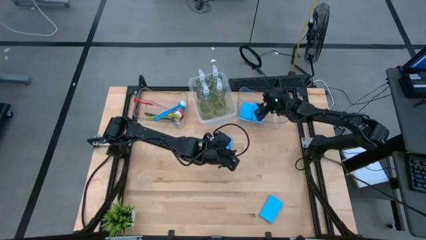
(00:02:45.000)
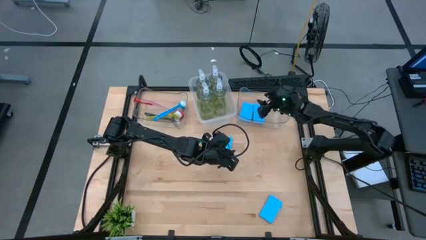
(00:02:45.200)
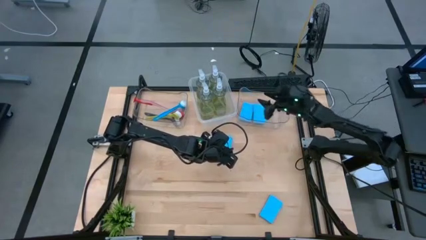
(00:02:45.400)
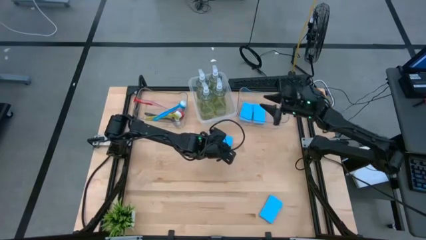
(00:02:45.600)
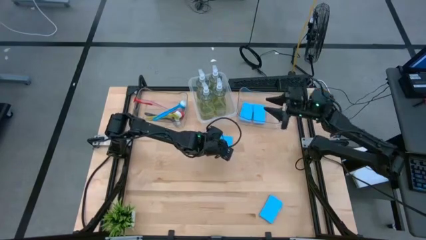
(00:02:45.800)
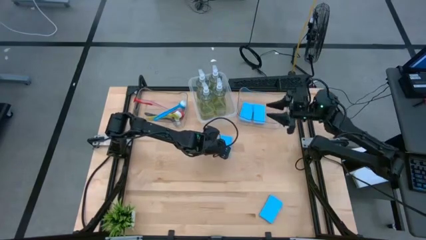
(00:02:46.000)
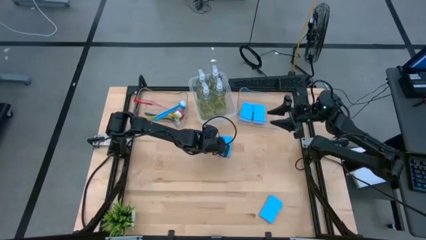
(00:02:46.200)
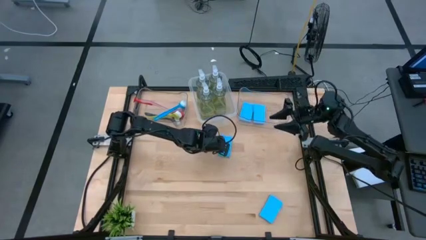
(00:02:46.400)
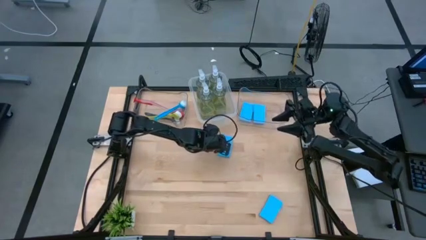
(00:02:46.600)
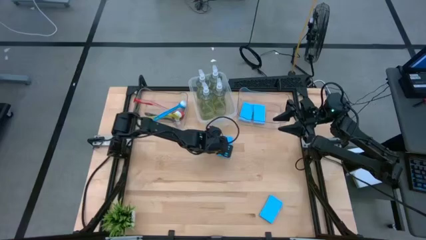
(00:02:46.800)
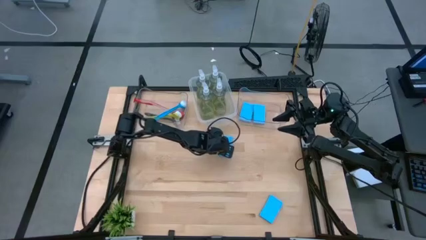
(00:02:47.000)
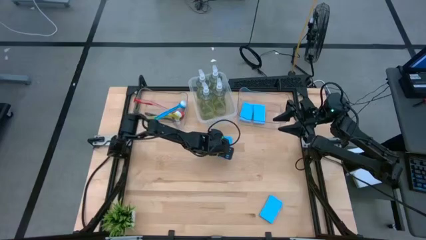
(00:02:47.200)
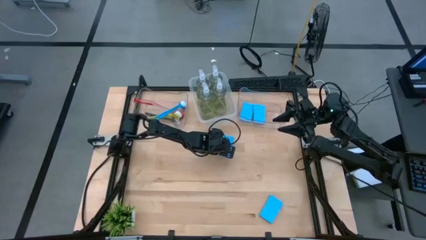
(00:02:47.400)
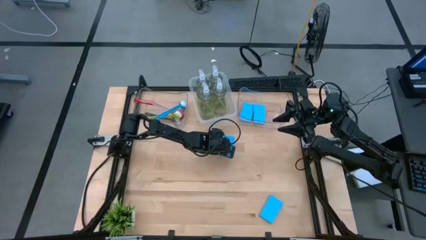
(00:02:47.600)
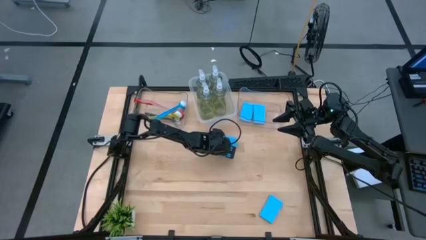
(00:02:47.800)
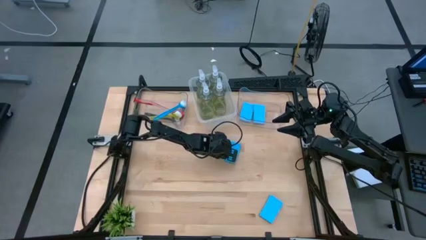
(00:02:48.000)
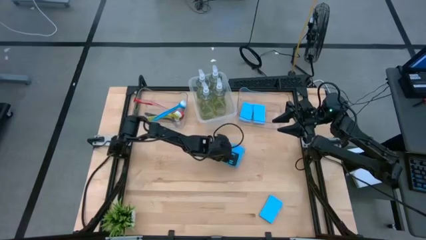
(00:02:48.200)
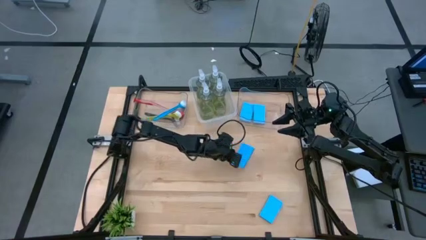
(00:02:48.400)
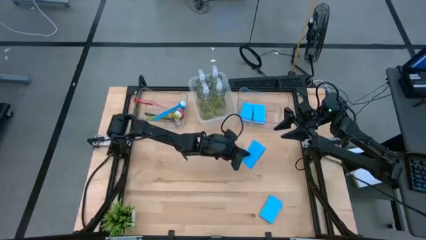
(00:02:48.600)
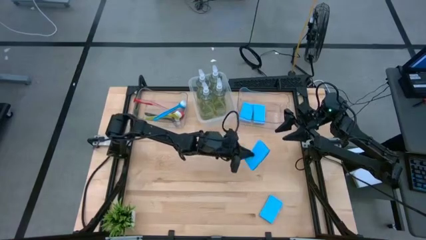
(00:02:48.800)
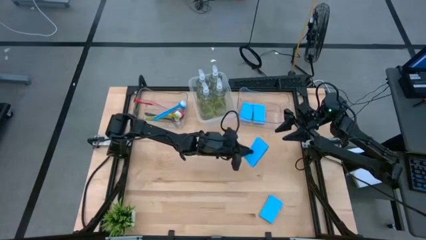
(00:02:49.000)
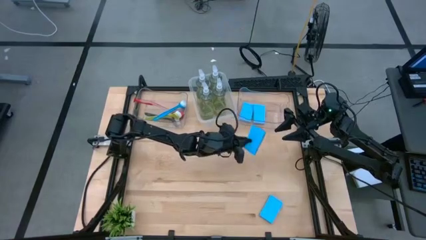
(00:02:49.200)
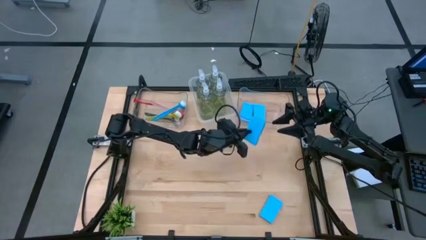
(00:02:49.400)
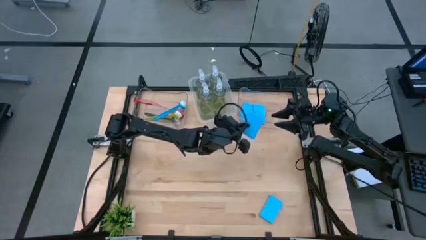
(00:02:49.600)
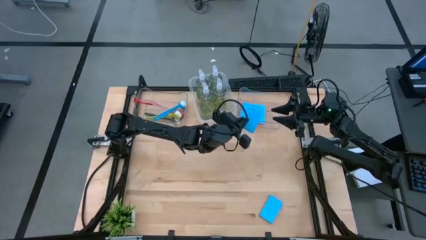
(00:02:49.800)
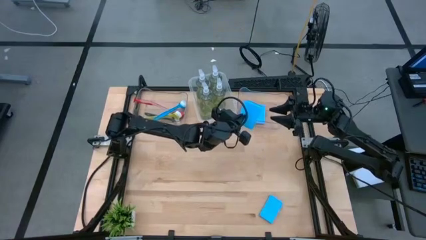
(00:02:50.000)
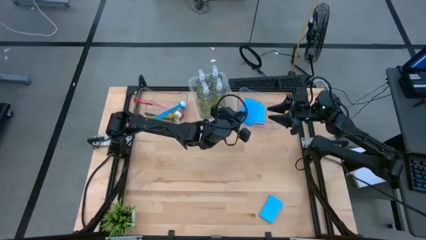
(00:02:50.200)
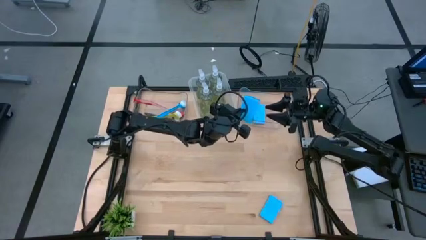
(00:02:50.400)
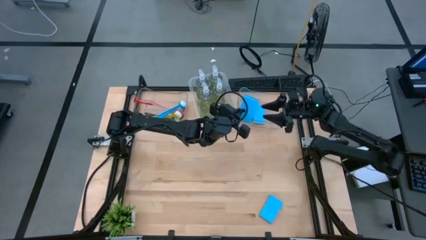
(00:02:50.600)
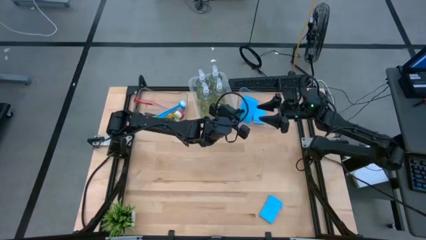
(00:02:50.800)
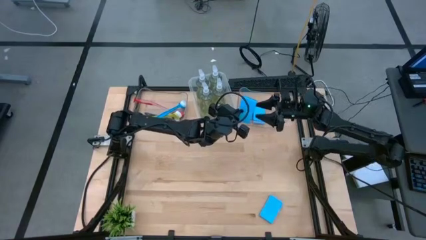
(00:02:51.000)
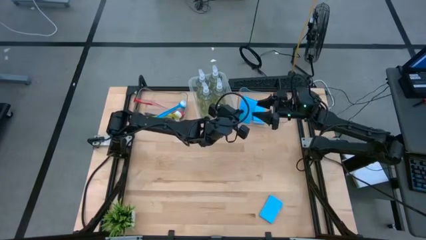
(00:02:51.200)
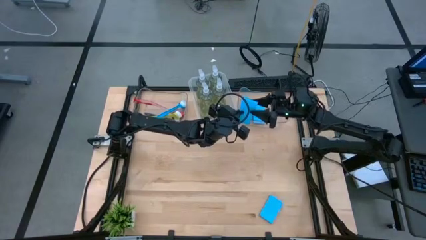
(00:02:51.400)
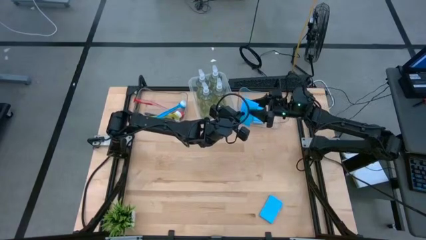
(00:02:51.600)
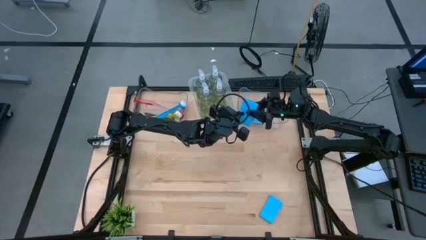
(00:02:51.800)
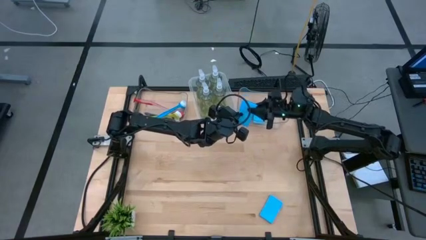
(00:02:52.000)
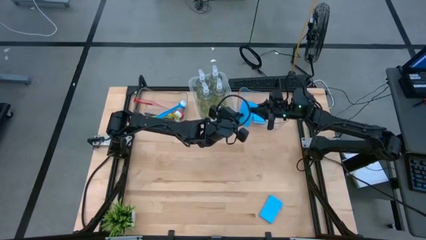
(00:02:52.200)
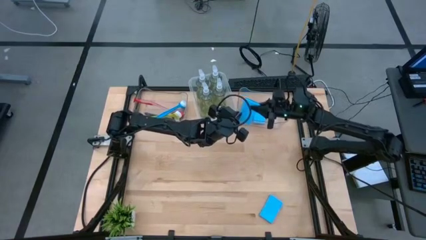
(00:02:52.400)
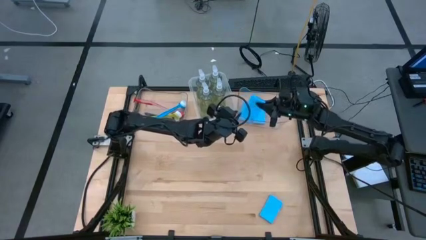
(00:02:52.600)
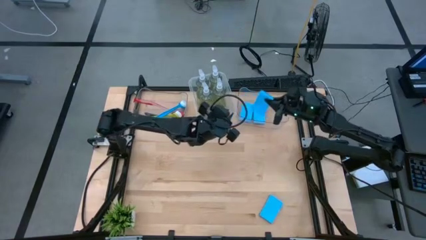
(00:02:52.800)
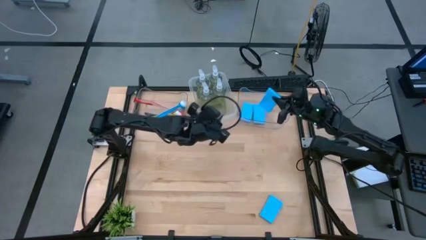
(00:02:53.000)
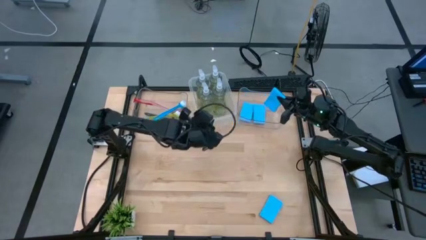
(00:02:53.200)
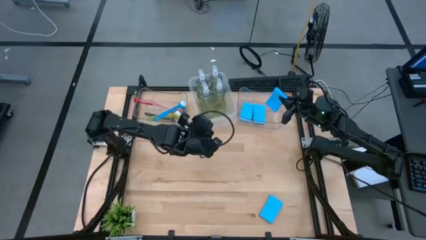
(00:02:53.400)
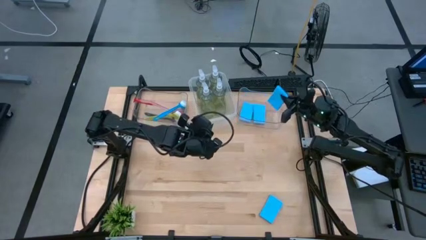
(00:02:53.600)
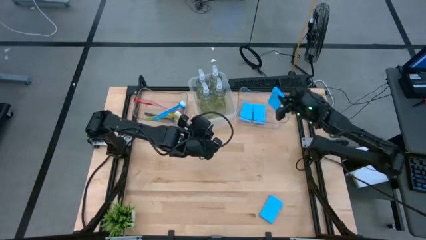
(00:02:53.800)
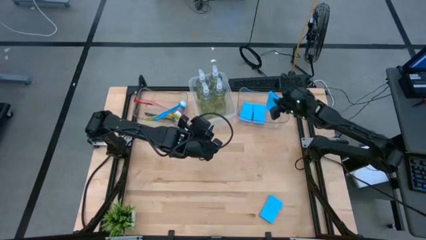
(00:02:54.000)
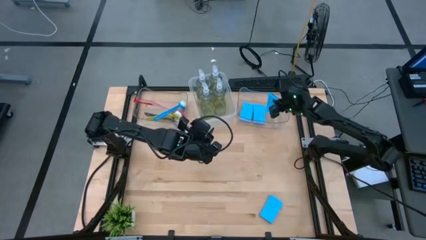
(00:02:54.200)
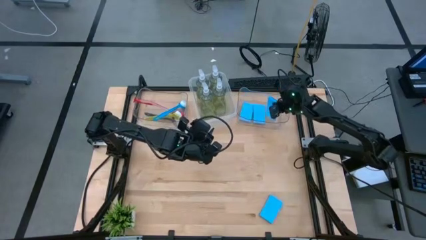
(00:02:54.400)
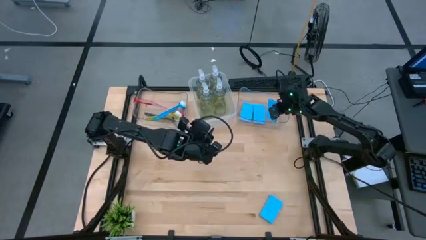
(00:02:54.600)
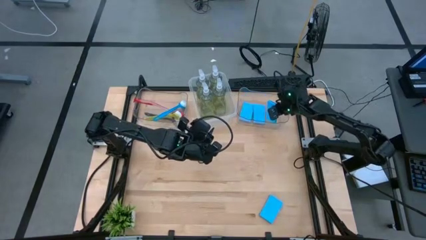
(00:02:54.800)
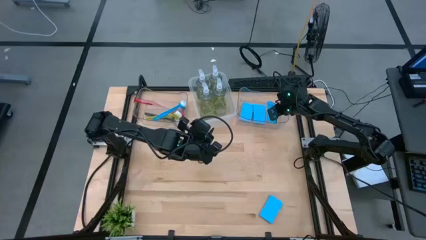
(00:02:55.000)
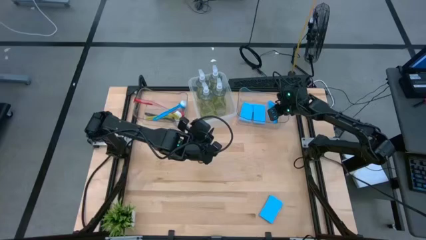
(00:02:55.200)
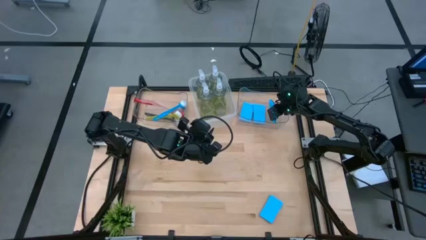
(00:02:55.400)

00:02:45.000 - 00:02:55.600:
Task: Pick & Place Kitchen Sink Supplies
Put the blue sponge into the right transparent bin
